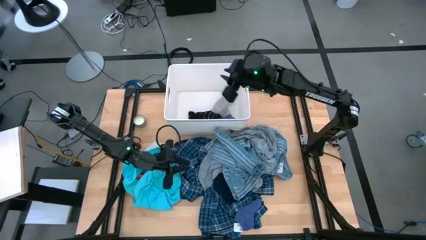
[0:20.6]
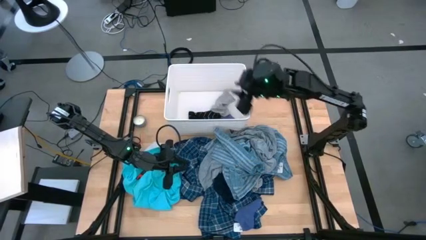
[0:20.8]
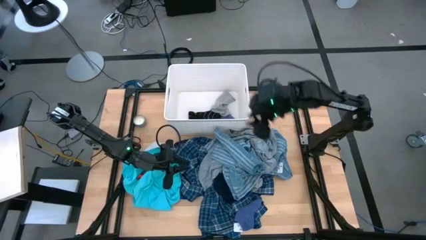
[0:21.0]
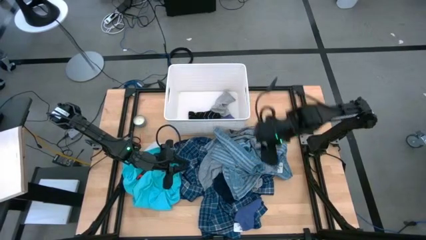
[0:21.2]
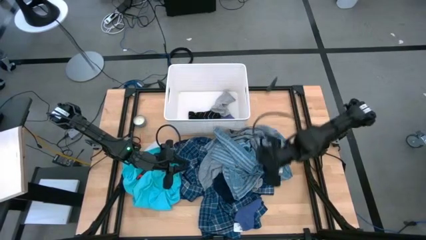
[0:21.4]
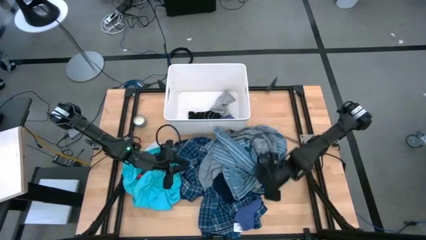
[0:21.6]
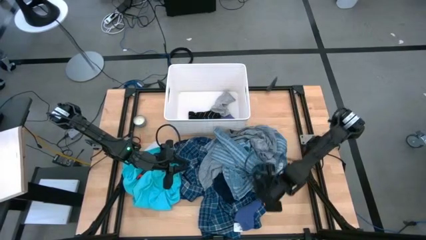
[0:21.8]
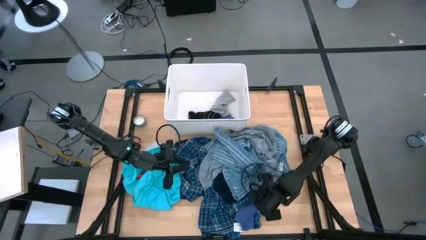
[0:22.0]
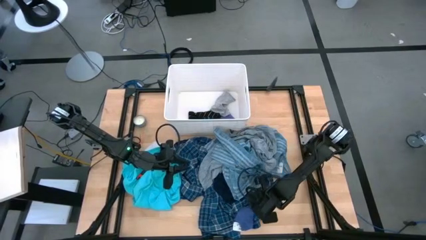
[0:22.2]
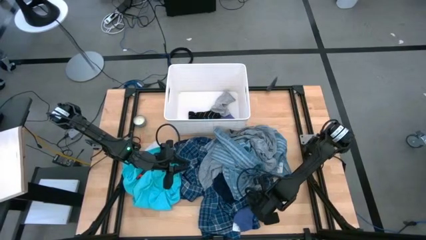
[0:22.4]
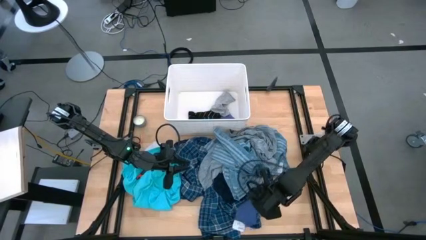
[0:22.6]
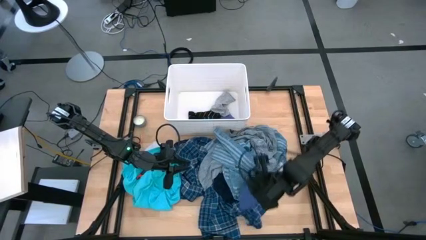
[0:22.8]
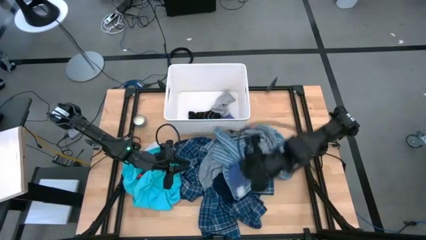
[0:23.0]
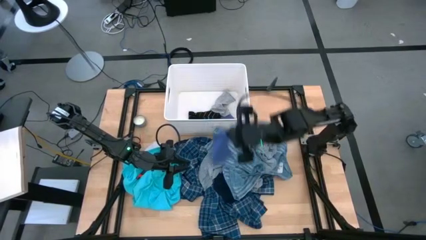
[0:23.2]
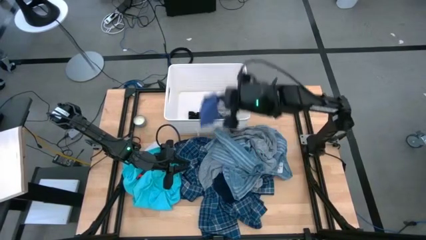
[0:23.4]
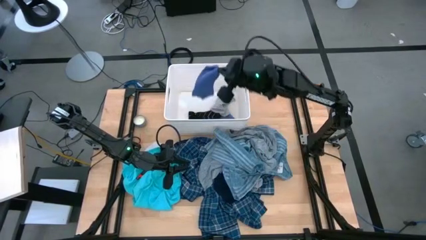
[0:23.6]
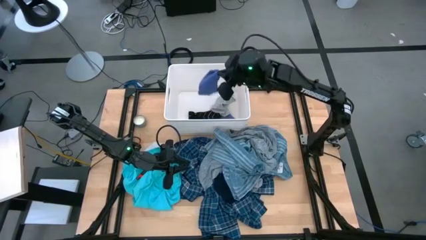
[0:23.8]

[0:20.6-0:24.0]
Task: Sort clothes
Put the purple sock into the white bin

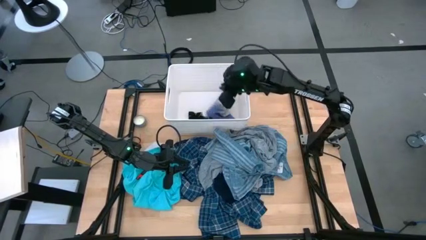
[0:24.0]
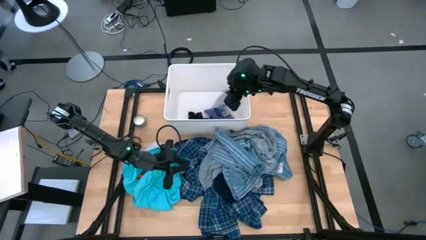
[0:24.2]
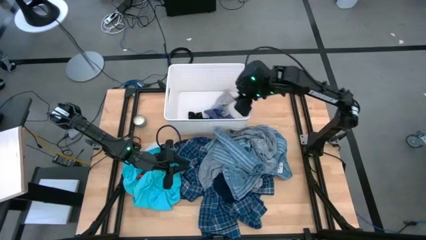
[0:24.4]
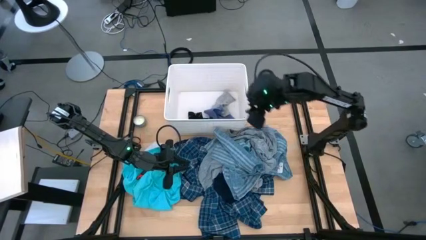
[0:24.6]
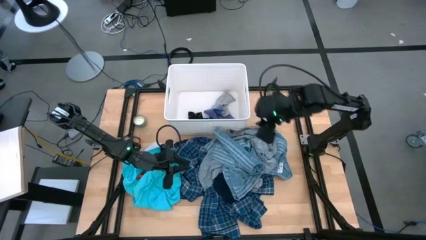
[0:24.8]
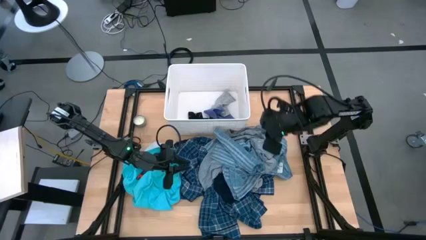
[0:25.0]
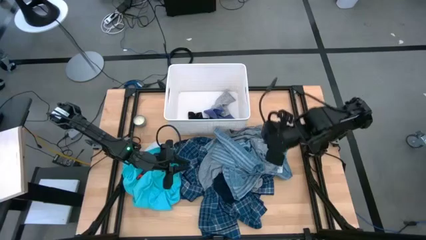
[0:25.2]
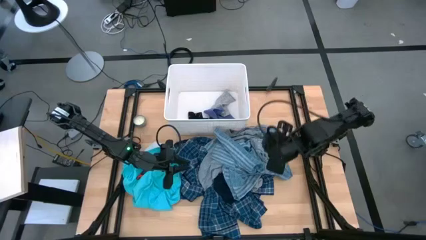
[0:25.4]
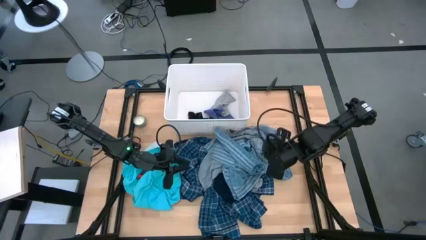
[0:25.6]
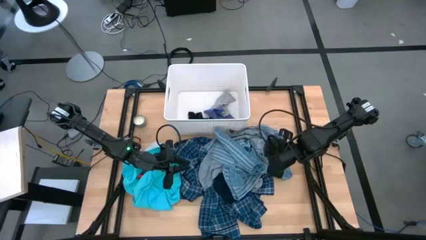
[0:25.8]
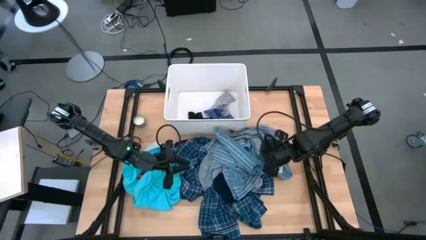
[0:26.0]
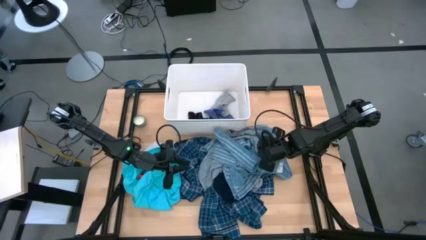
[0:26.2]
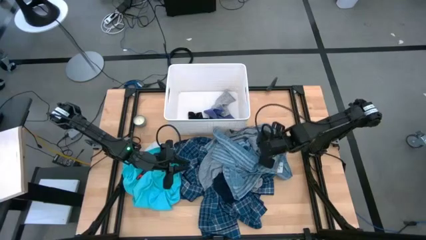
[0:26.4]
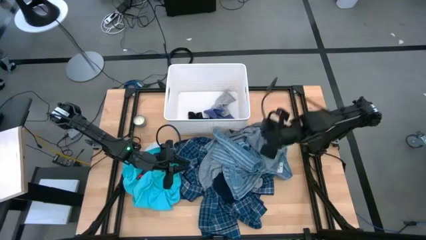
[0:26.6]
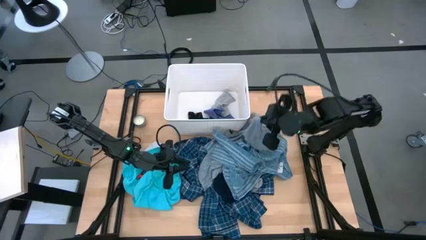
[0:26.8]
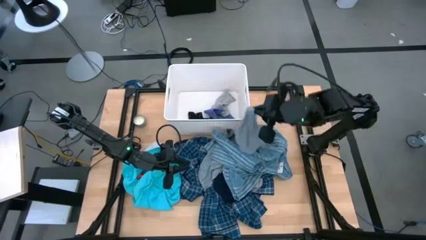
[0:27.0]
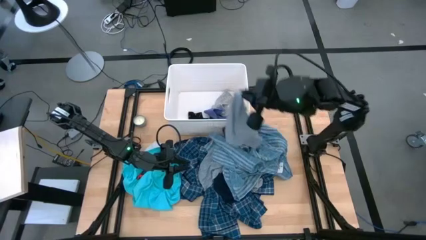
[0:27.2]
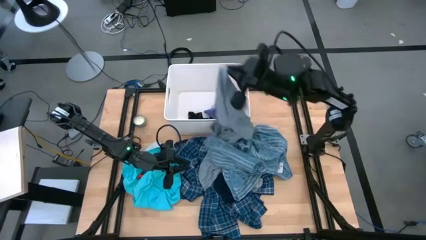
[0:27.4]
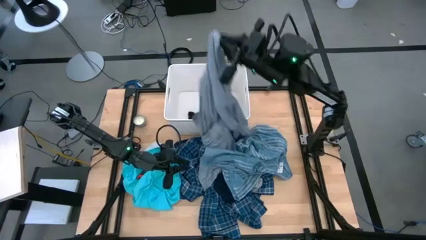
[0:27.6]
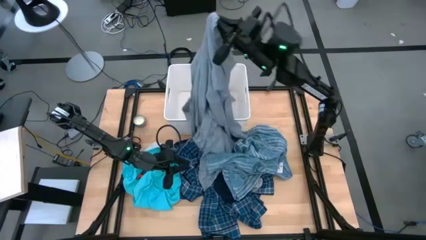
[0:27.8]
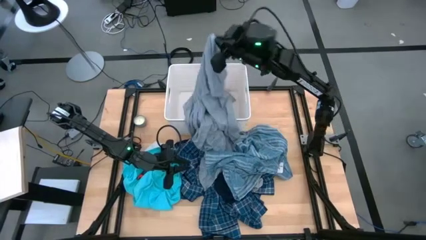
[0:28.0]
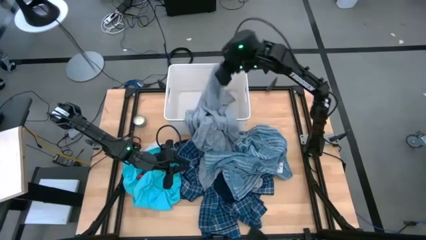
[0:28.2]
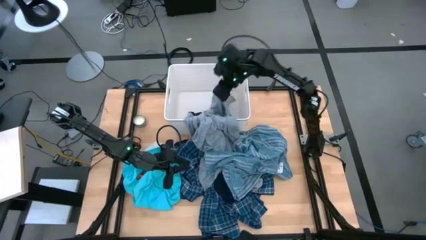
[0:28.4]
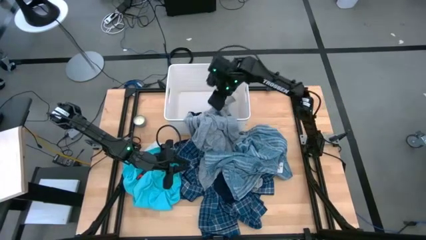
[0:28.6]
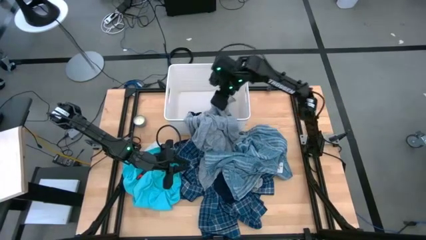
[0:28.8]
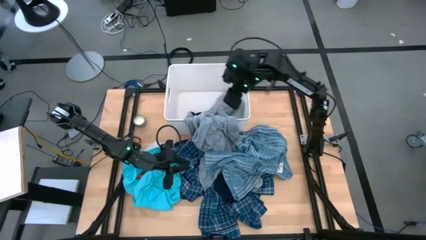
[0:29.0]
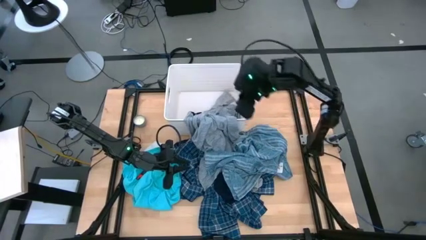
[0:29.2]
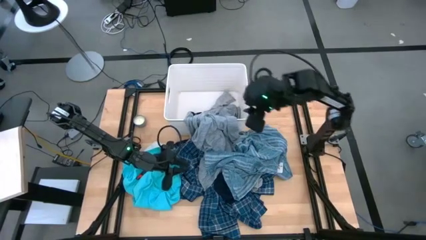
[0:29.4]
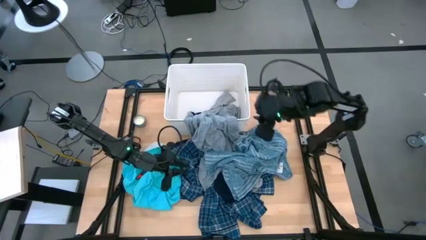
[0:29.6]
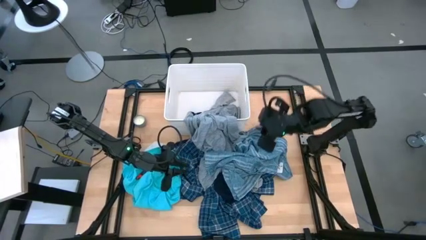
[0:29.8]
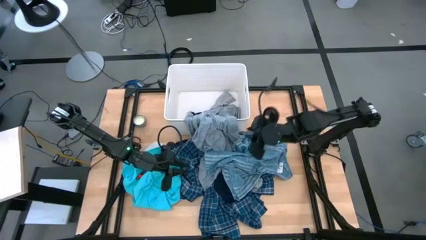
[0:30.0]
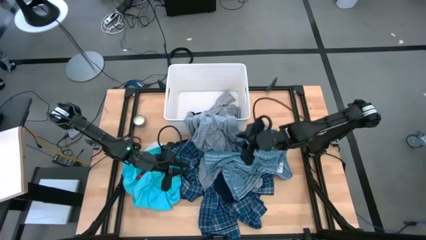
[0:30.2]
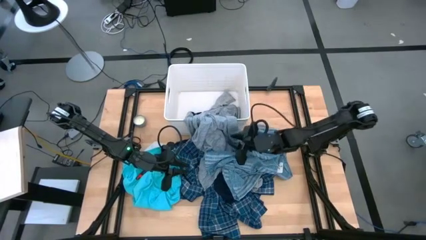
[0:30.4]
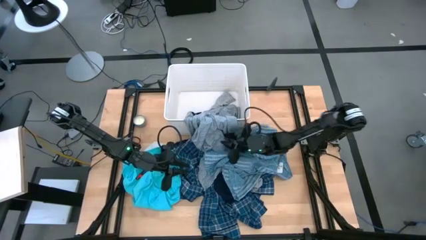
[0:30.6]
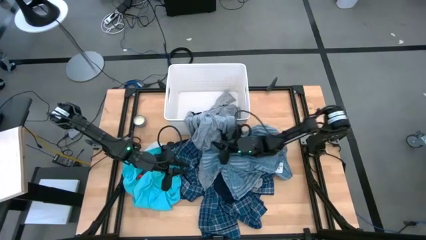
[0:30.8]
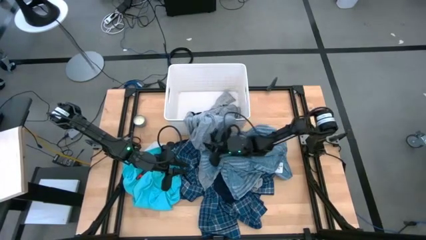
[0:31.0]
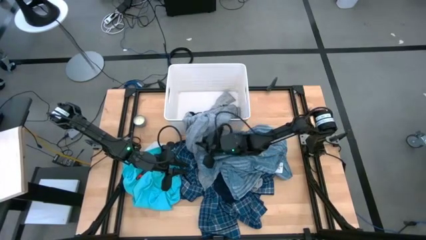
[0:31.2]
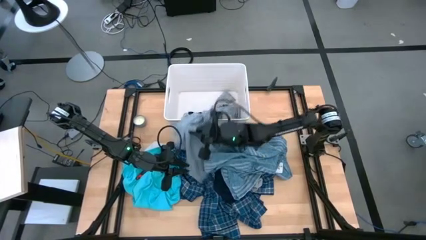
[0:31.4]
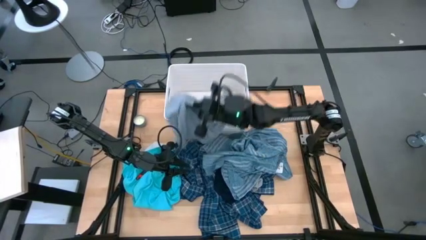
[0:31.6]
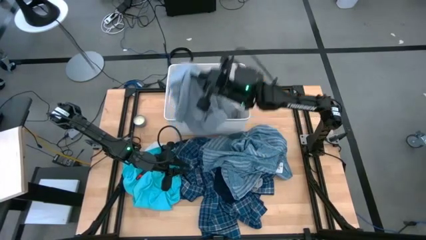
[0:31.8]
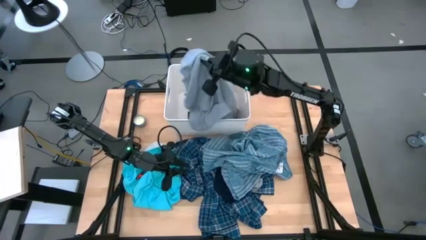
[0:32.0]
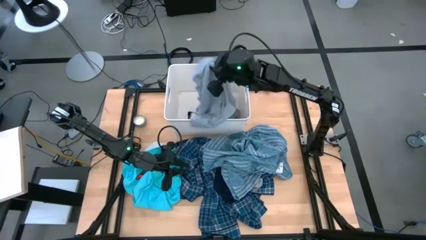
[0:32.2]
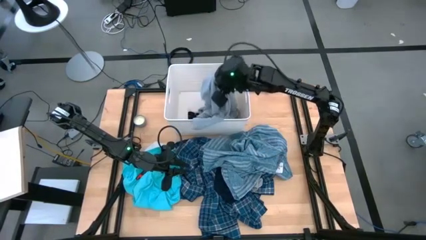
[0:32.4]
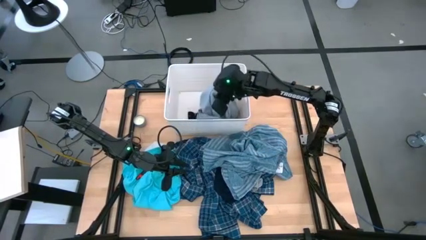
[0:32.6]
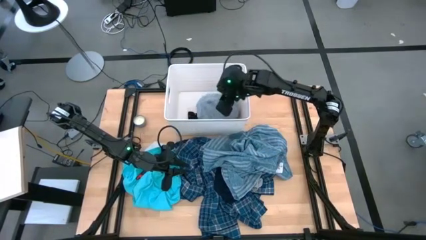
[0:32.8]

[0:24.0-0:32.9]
Put the gray shirt into the white bin

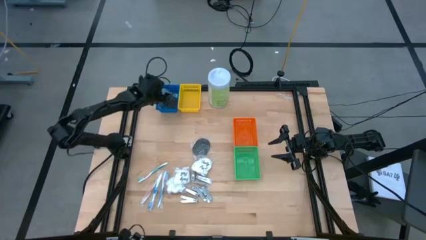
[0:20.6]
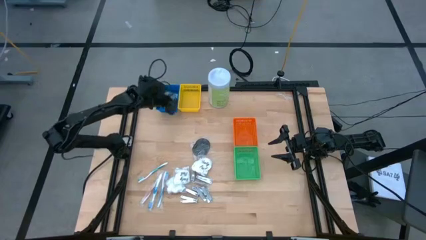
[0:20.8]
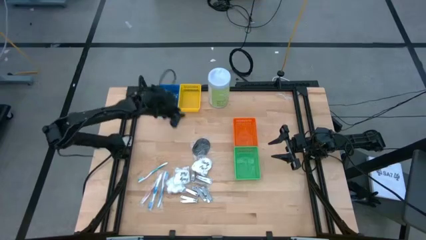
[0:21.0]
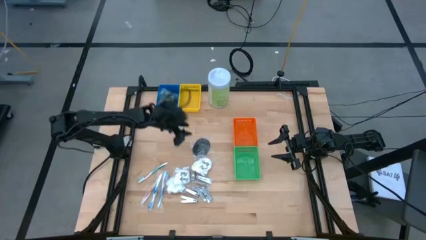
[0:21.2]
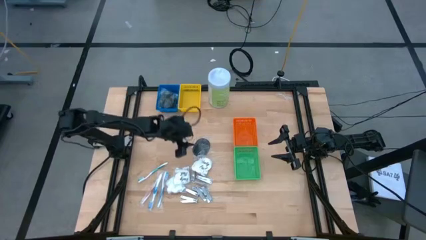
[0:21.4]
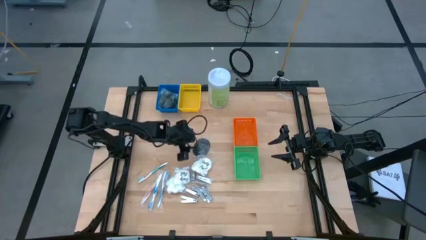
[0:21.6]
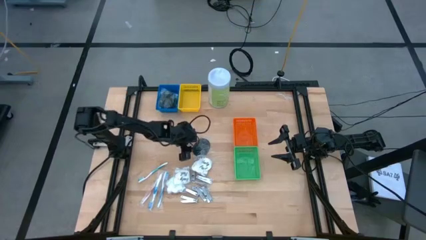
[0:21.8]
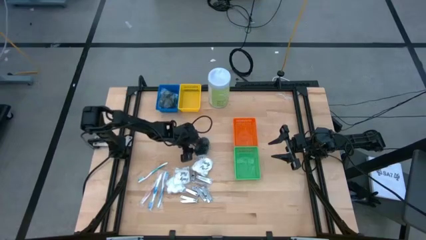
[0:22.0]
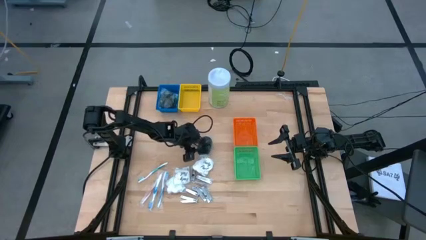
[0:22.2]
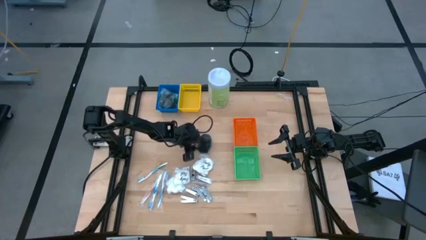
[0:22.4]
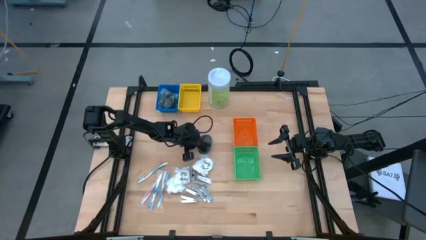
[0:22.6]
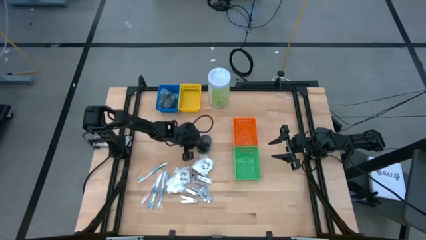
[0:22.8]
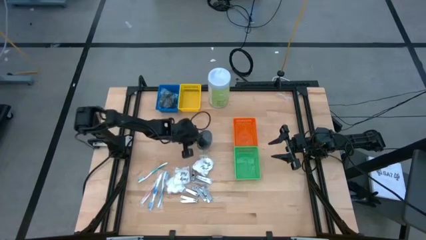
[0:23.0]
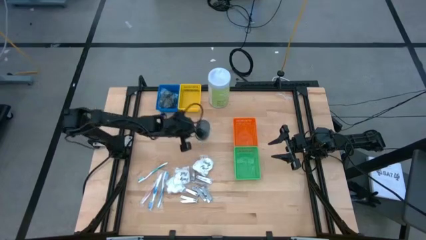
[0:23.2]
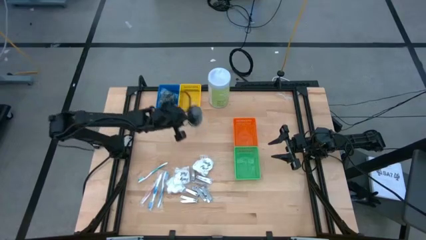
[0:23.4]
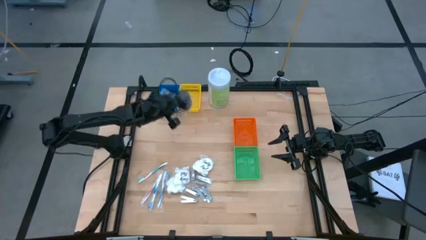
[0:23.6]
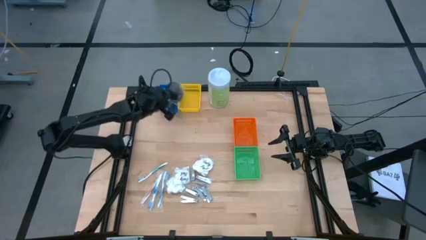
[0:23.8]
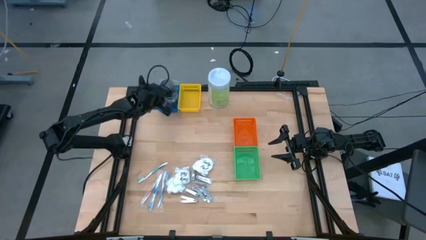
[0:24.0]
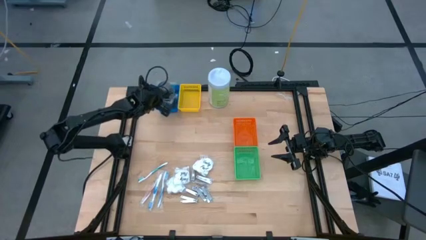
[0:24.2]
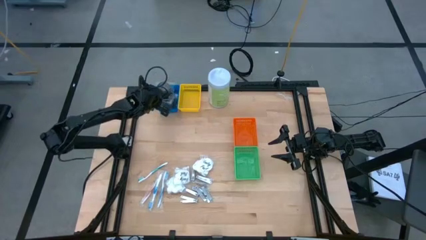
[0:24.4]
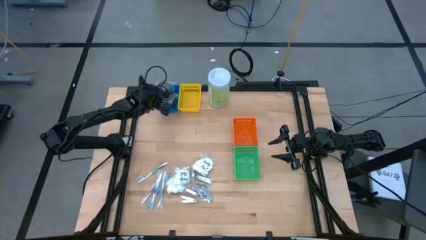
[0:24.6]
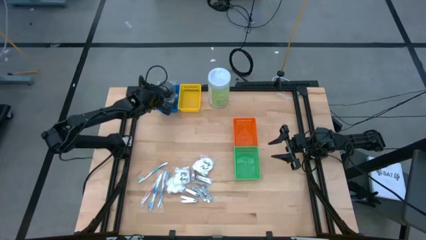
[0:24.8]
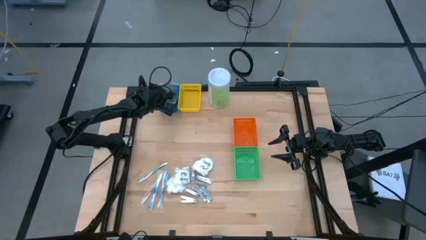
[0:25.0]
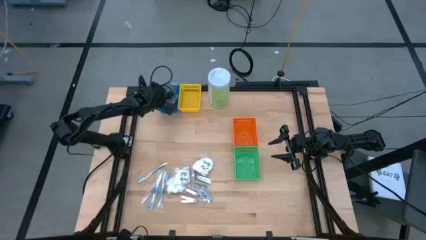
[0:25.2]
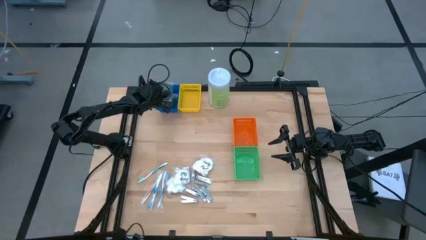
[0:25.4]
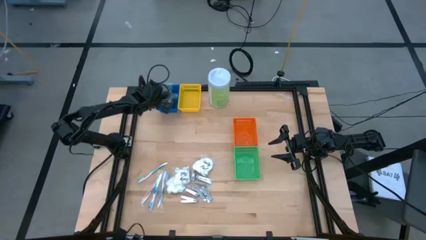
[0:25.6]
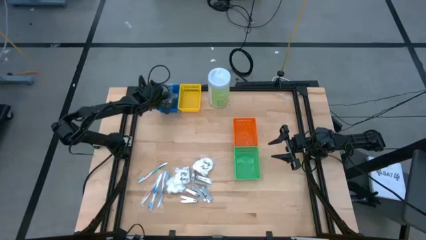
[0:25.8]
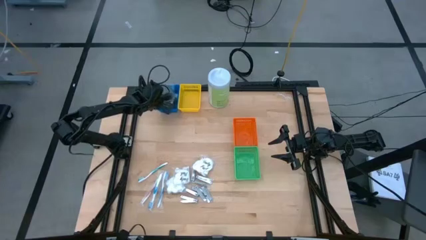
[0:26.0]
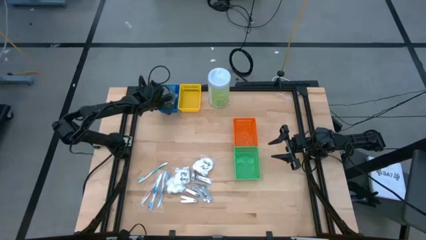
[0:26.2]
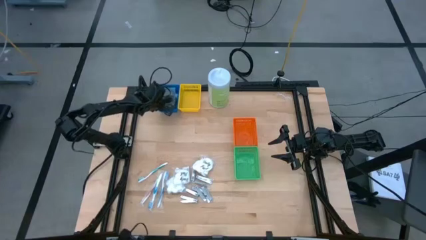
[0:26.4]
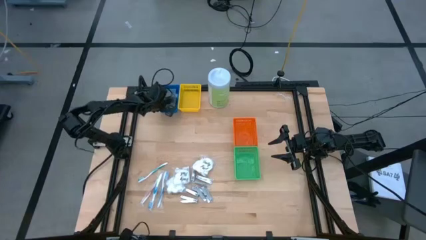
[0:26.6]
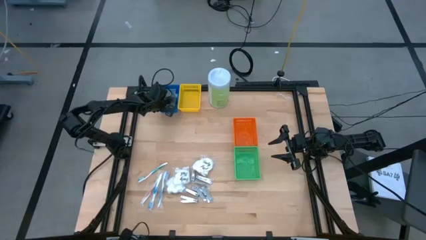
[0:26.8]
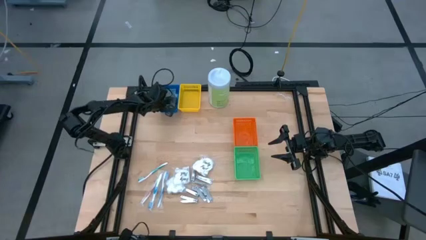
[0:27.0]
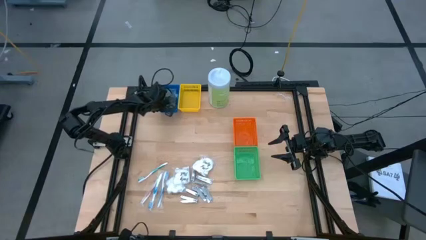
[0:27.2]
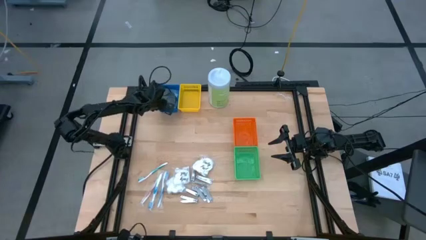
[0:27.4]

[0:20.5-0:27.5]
Task: Pick & Place Travel size toiletries
Put the black hairbrush into the blue bin
